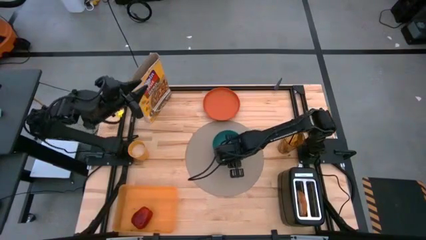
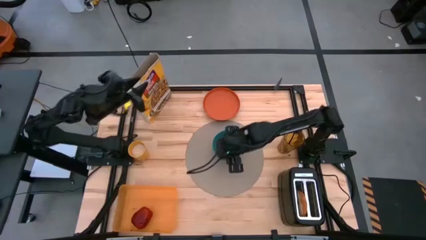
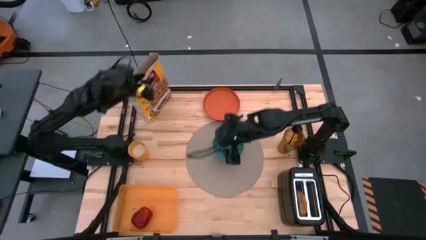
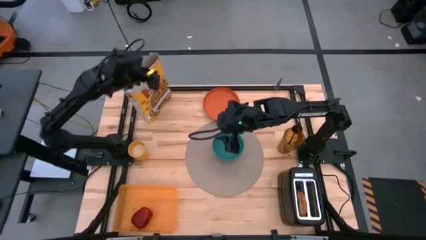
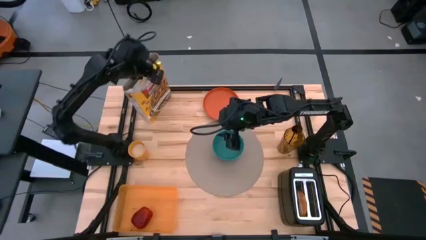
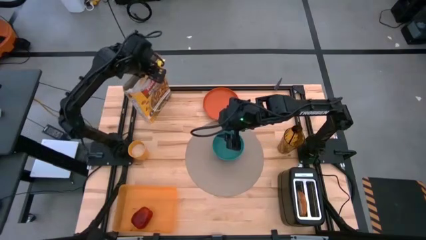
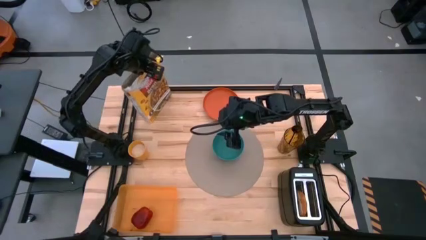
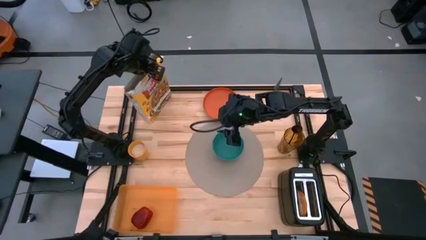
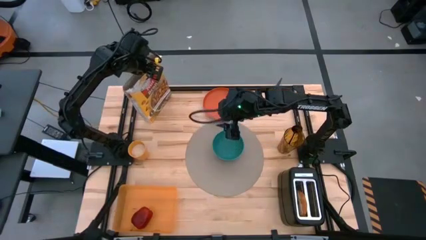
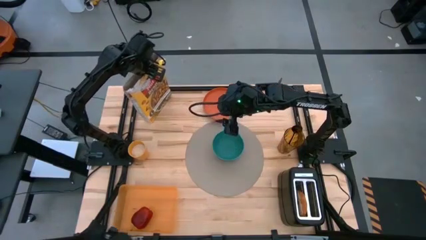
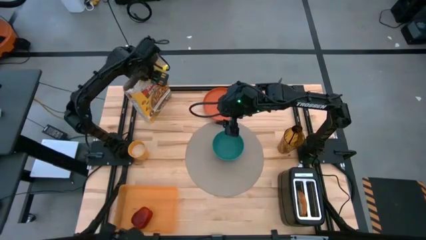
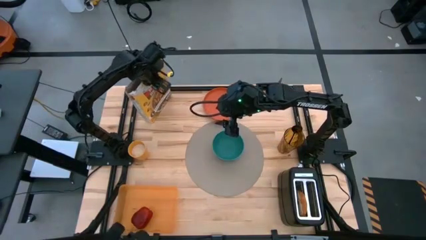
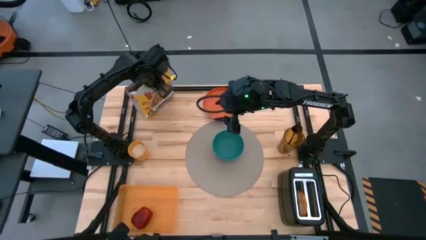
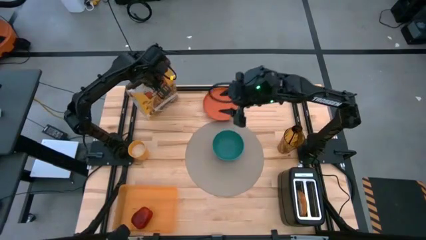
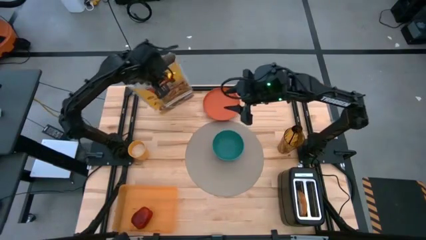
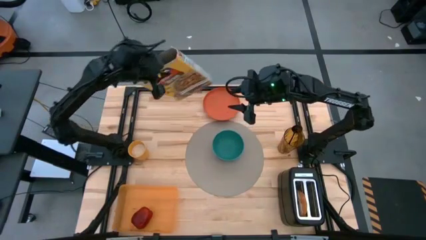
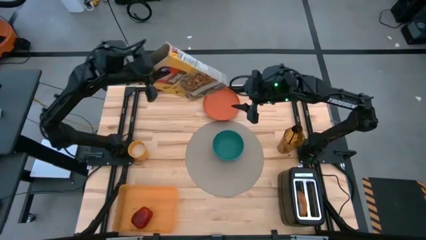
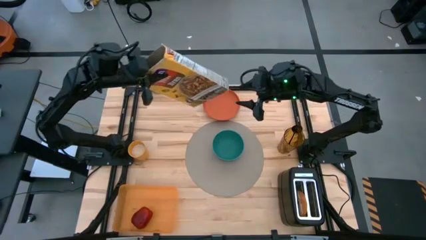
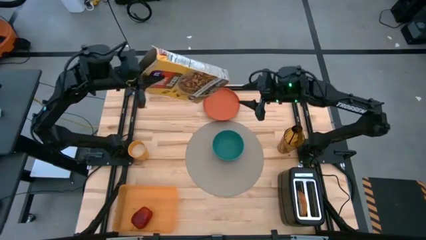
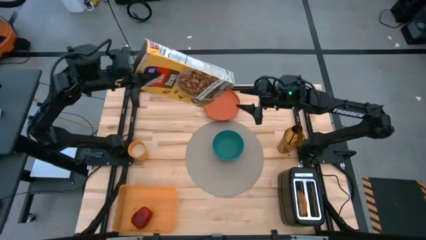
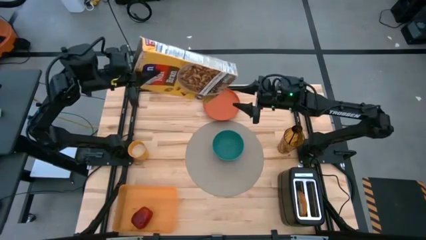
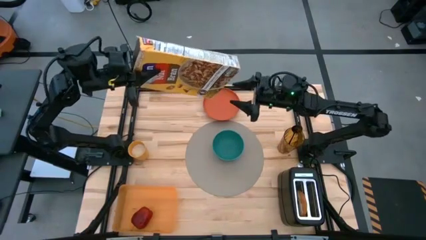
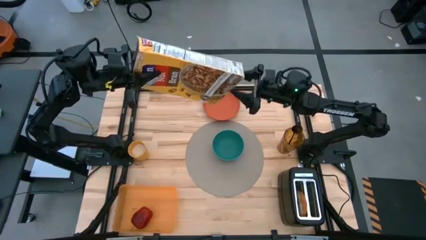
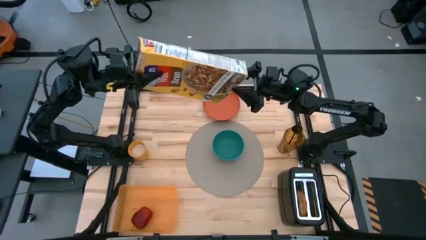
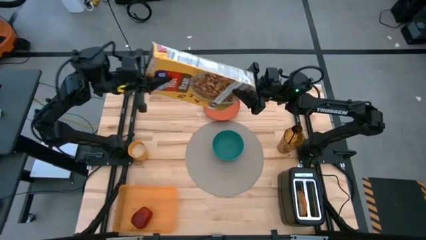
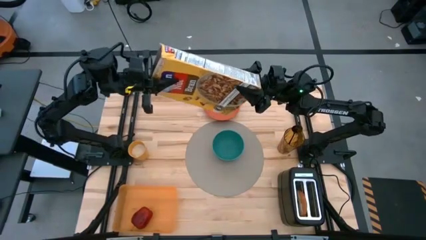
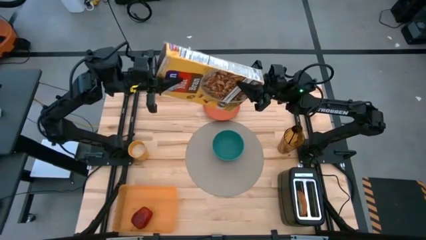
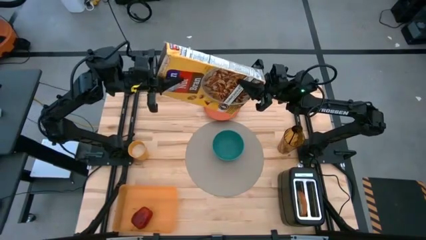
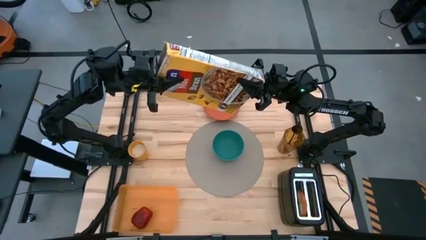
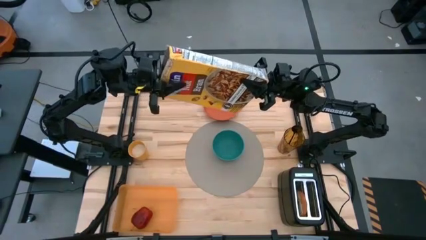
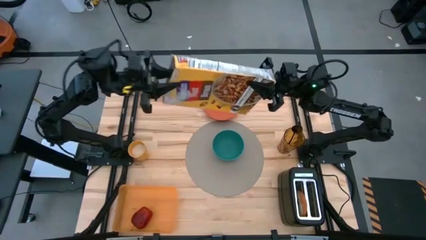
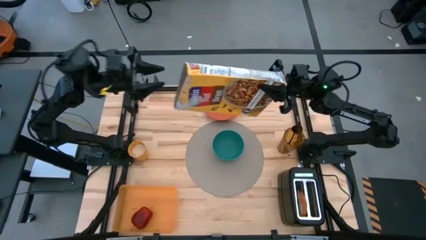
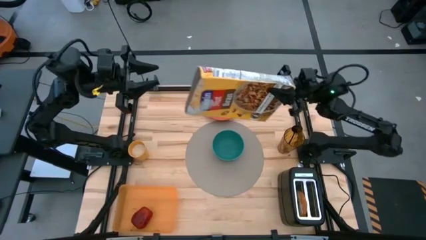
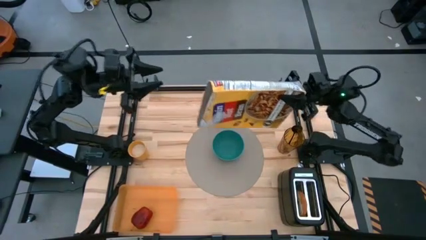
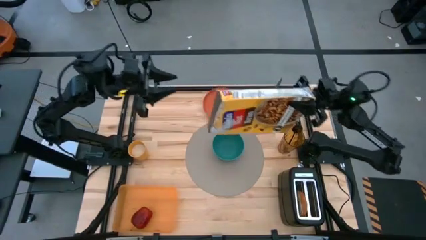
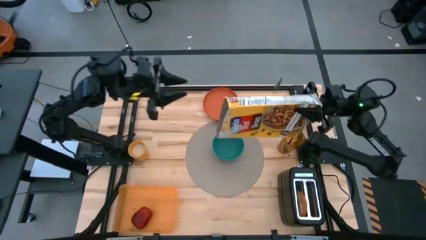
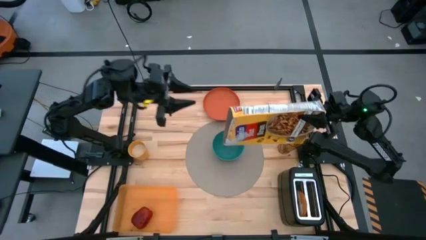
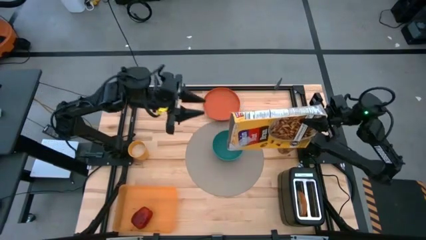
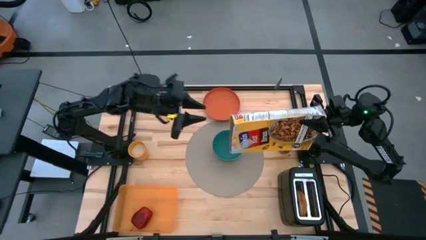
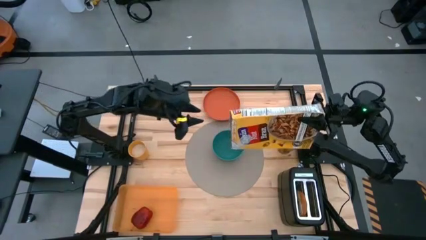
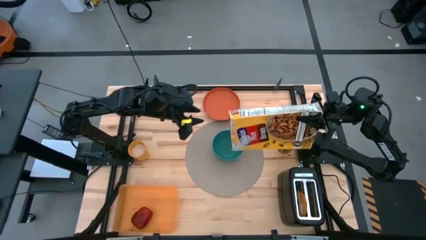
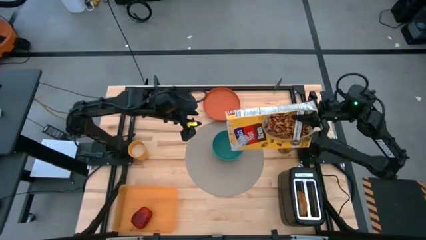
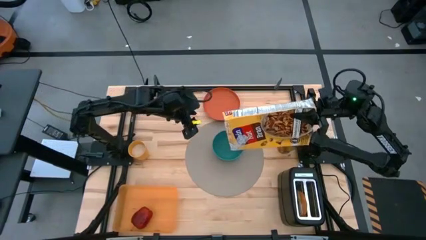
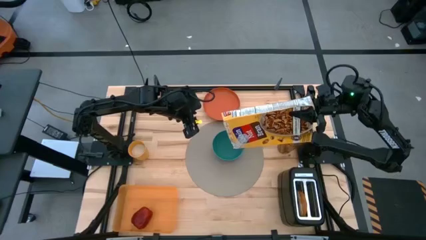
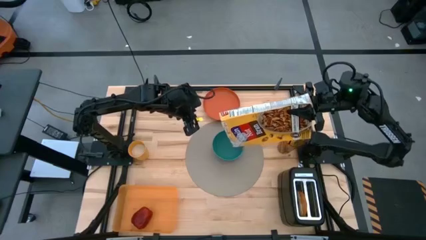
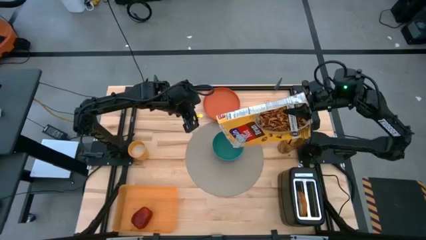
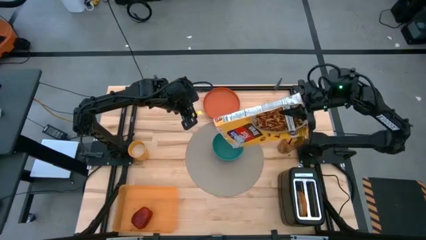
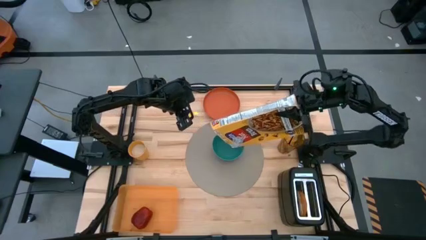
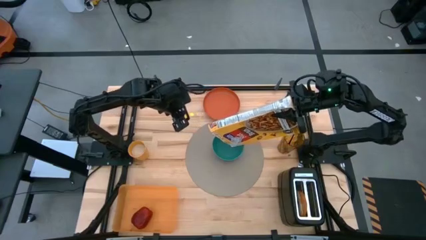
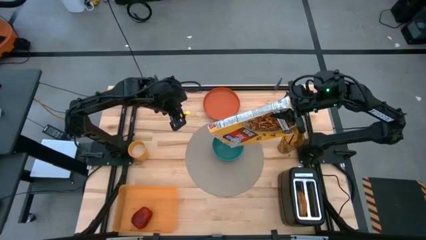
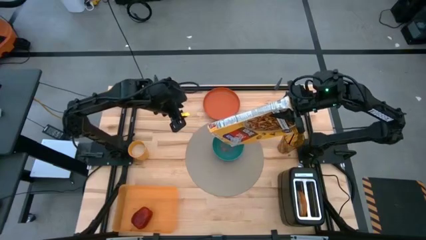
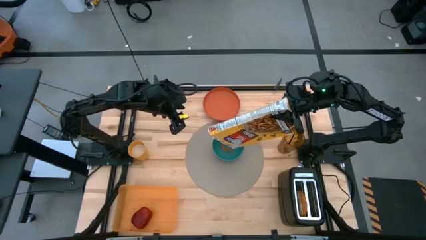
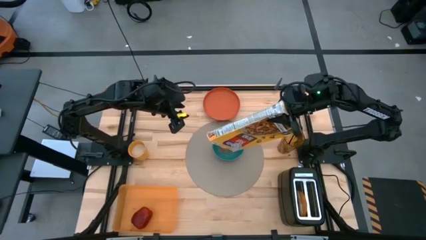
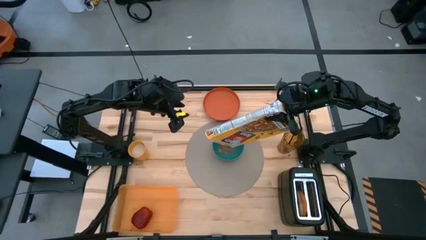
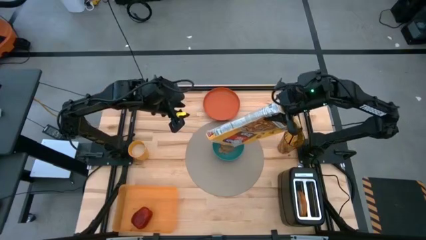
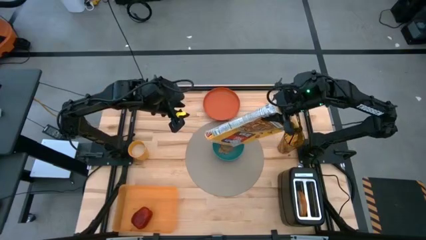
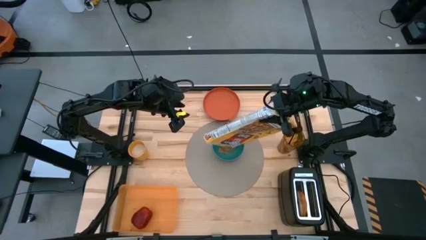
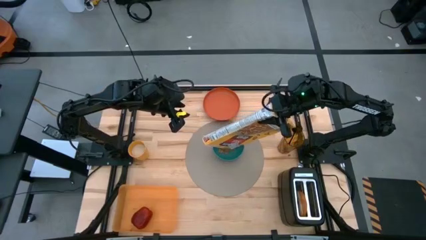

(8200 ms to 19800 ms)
Task: Arrange a breakfast setting
Pour the cereal into the green bowl

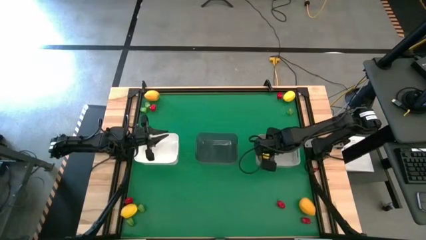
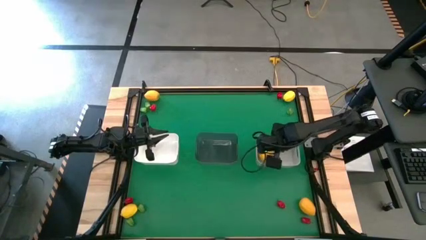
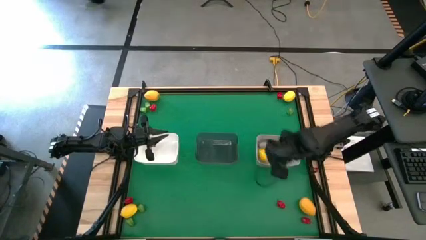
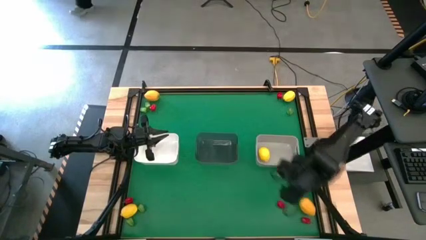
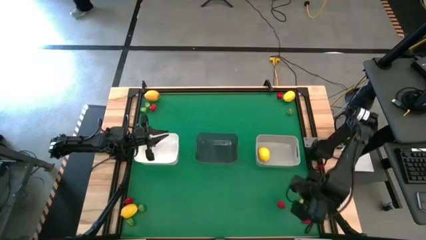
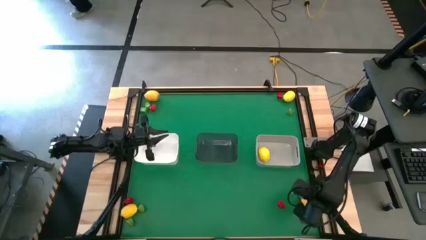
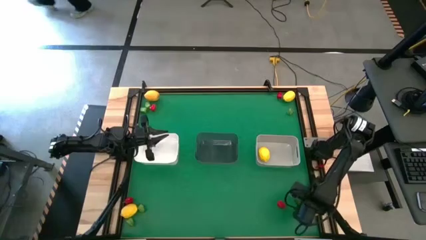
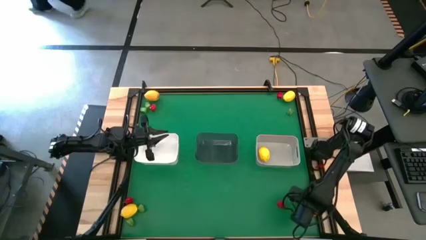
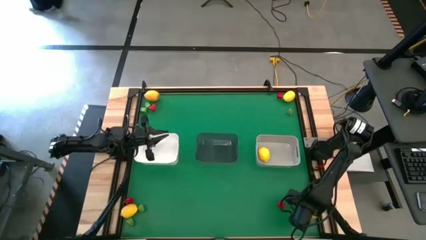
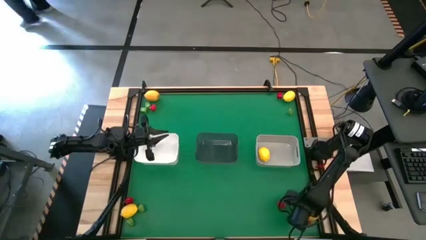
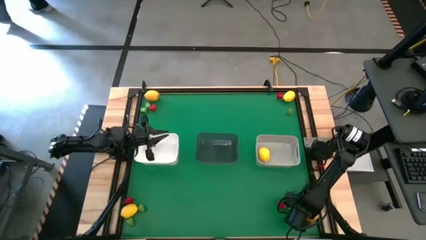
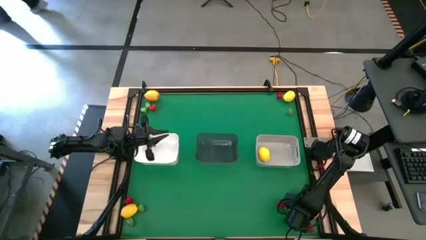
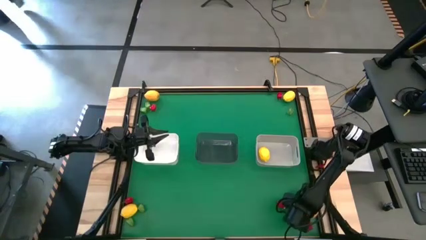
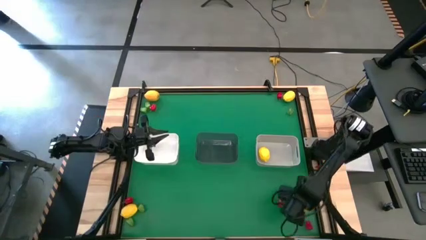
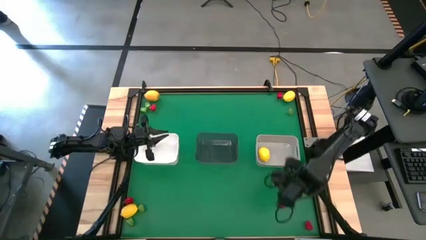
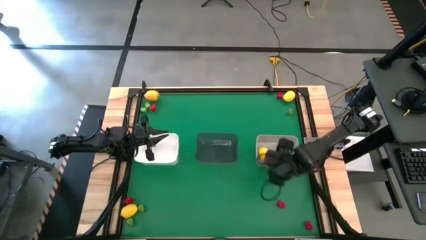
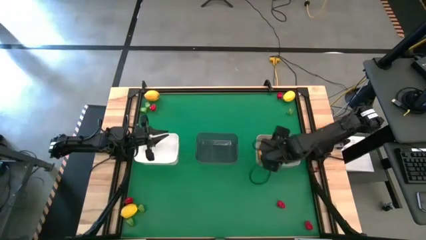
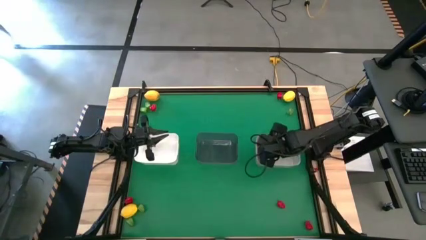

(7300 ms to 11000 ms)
Task: Sort produce into baskets
Put the yellow lemon into the gray bin
